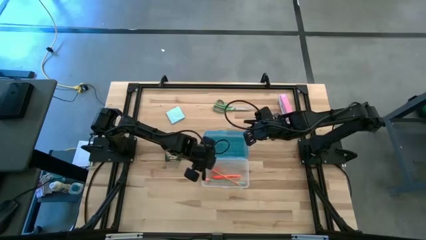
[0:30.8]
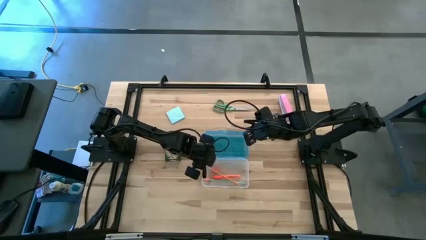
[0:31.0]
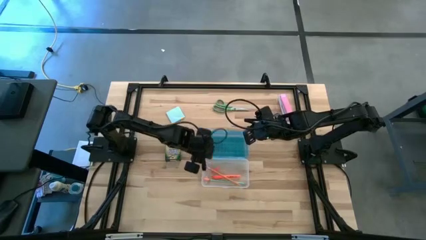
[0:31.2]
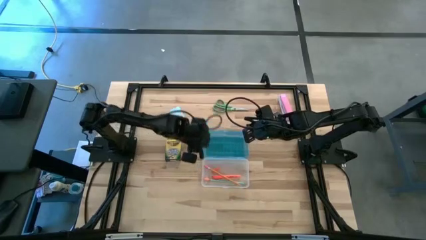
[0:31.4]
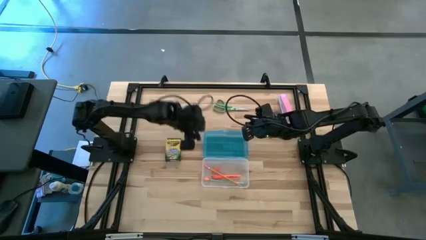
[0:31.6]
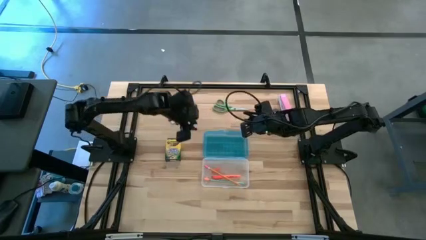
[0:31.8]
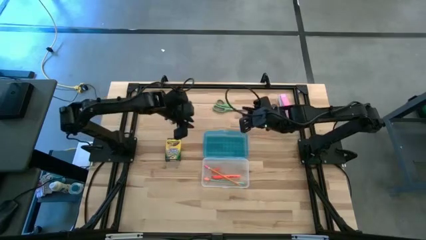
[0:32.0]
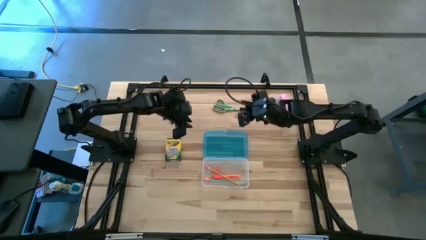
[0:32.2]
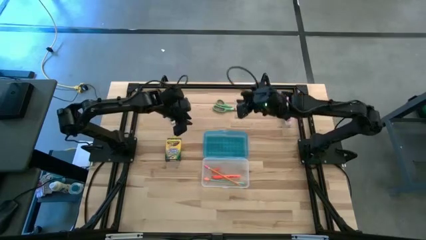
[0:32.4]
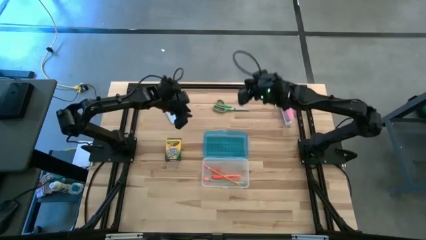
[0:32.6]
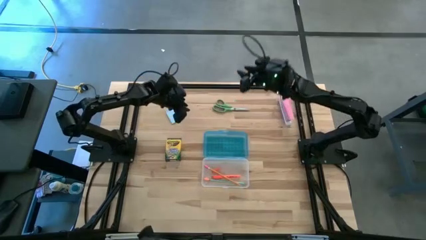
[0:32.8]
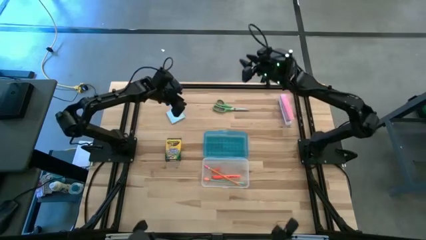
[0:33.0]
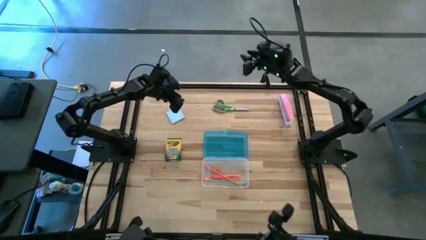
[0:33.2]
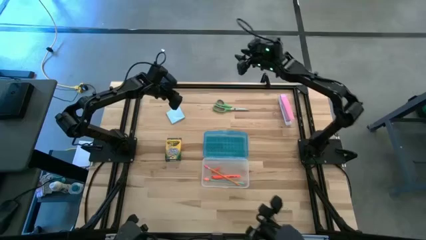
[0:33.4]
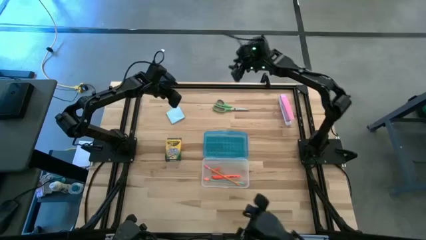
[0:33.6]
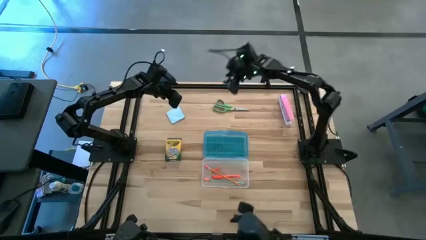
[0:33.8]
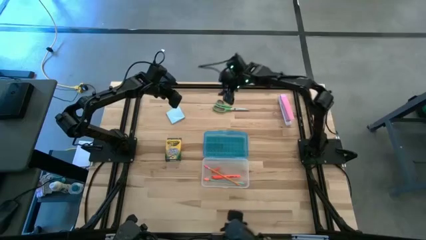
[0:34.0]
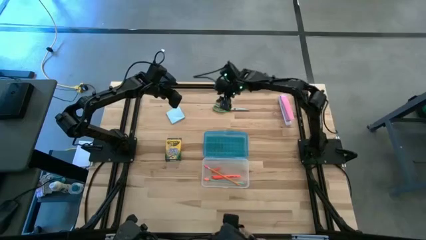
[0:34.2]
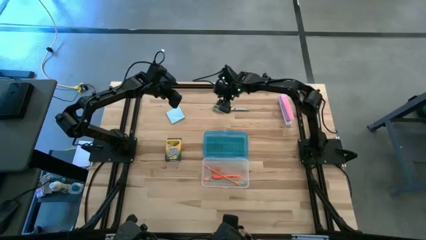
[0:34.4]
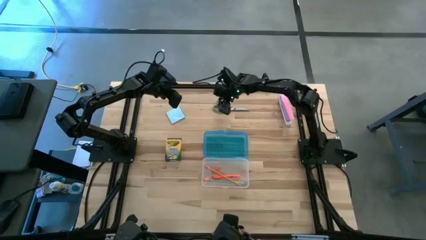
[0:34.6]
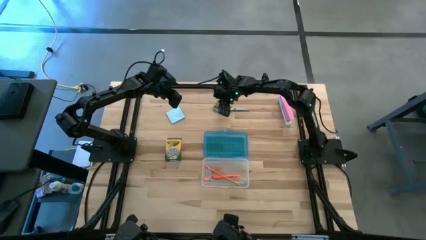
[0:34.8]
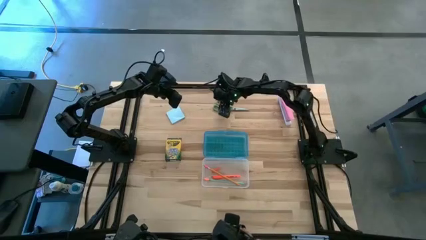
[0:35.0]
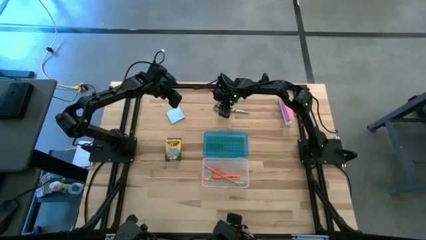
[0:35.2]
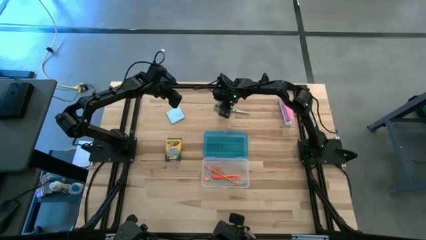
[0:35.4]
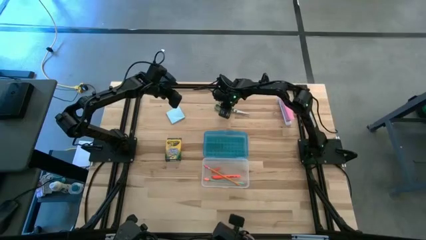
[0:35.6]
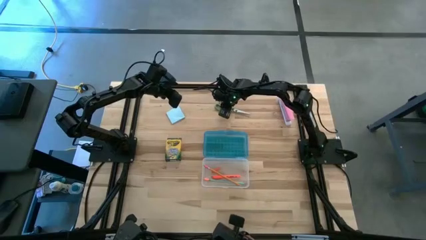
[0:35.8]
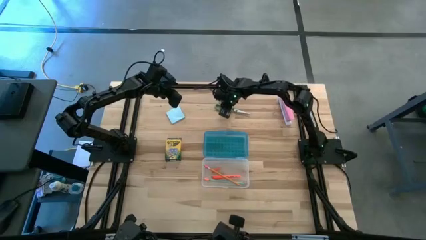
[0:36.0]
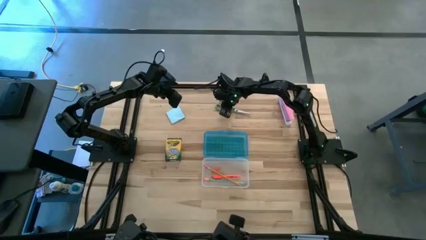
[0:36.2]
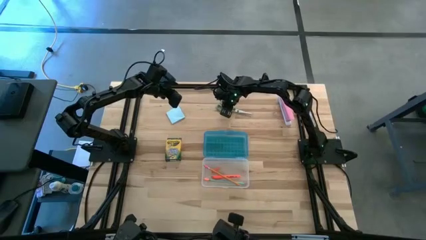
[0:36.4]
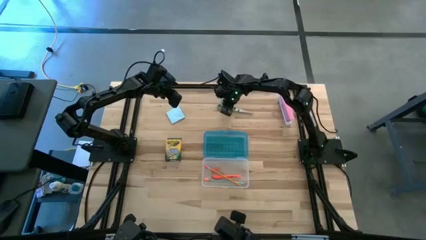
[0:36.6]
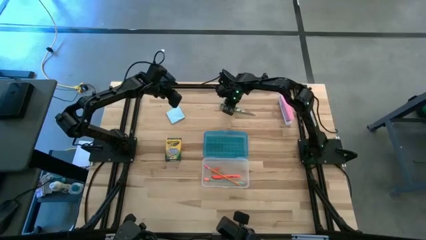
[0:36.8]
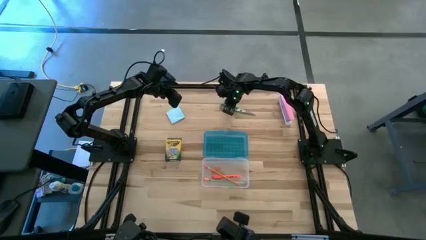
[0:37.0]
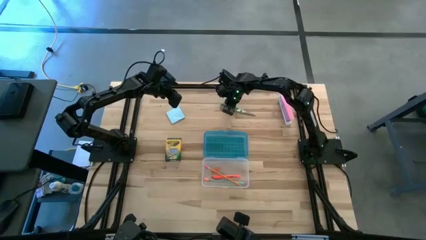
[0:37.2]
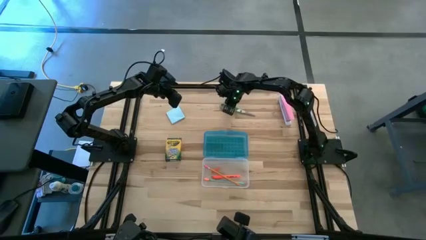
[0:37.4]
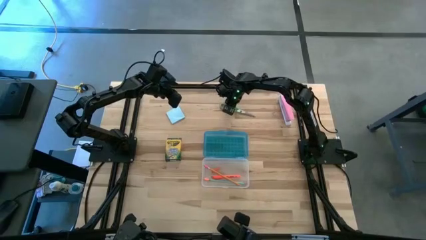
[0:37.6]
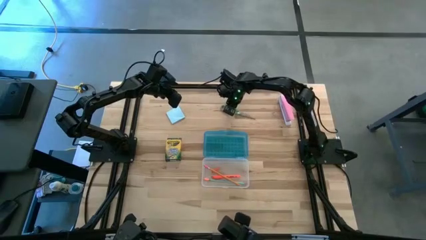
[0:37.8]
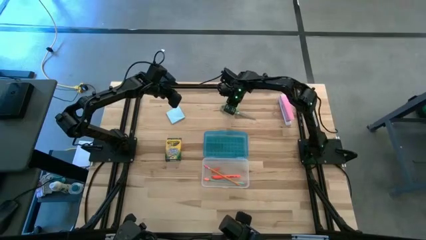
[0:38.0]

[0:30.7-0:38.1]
Task: Pack school essentials
Put the green scissors into the blue supply box

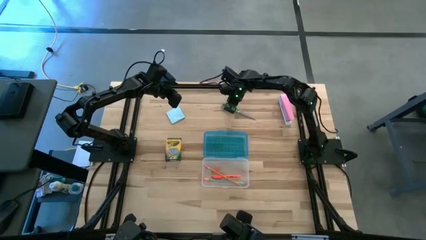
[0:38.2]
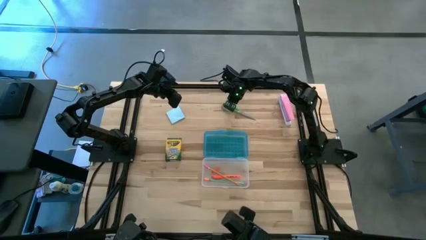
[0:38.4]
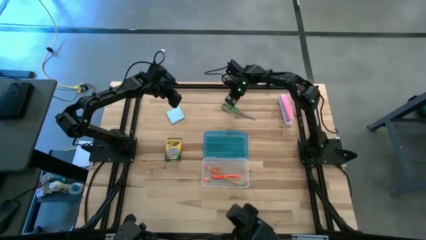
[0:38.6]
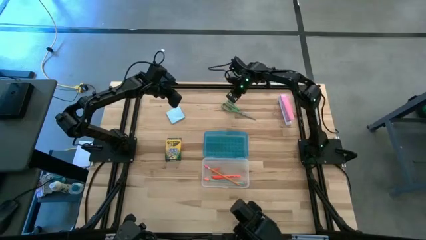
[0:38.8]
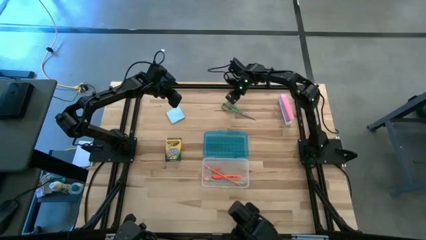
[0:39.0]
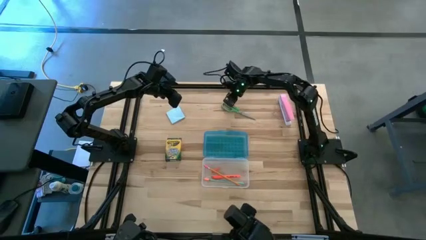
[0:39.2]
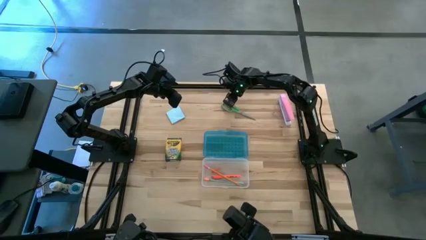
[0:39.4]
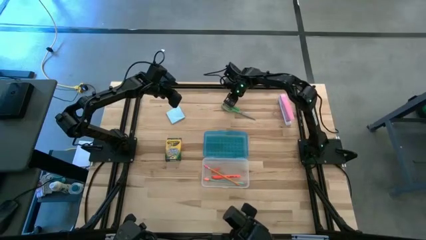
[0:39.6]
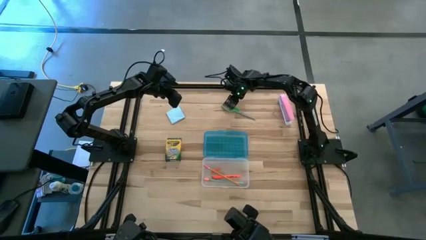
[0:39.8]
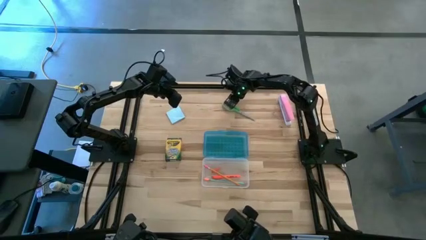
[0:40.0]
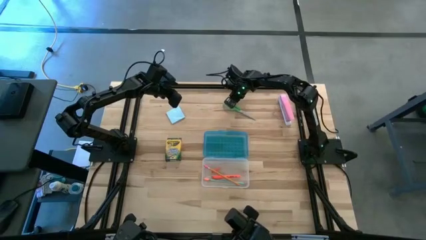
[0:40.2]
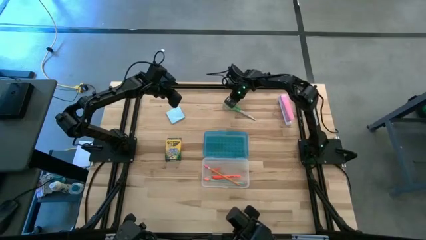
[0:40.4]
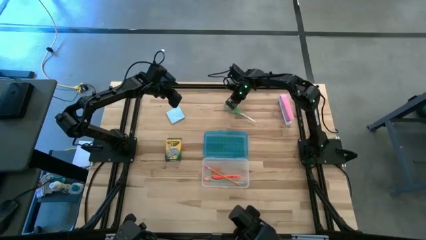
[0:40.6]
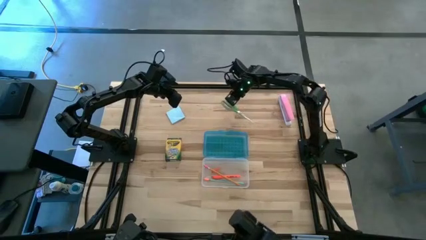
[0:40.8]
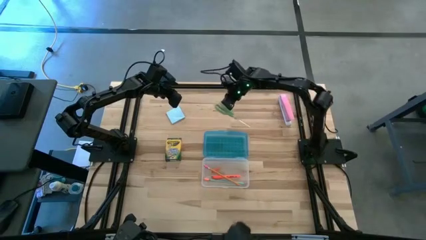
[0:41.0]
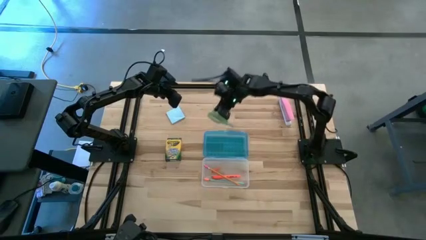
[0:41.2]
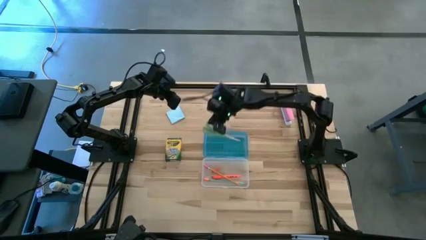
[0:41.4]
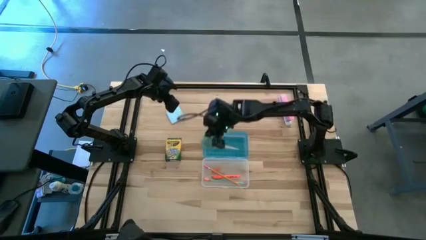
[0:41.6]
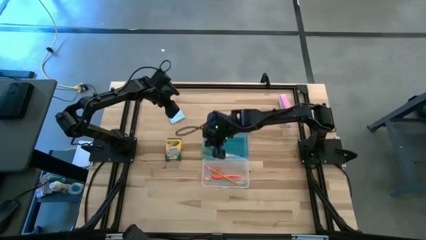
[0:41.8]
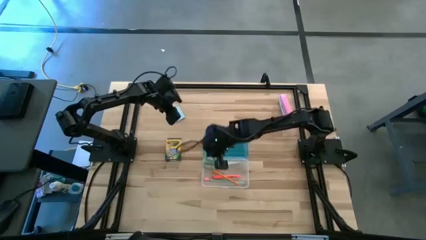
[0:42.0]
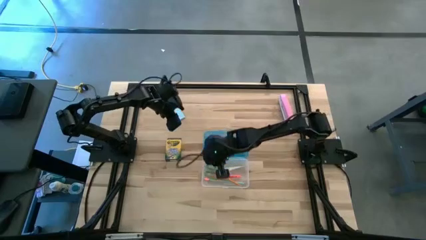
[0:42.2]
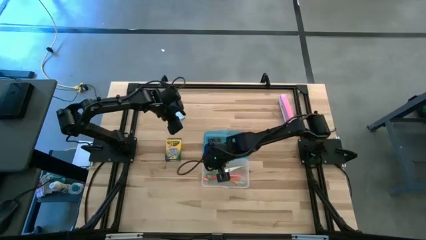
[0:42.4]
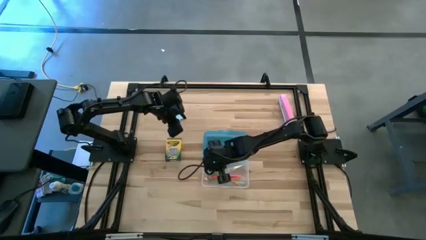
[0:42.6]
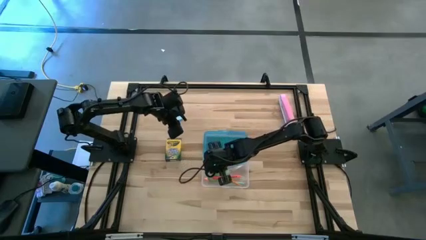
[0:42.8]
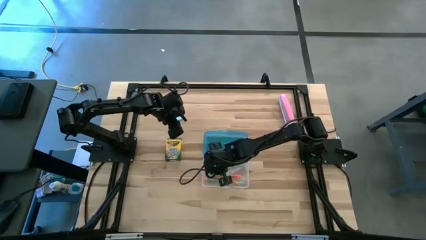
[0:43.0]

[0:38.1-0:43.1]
Put the green scissors into the blue supply box

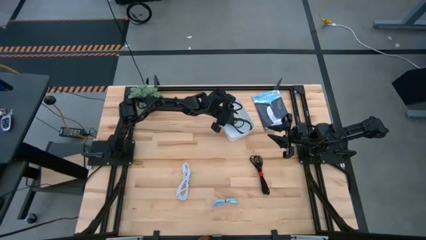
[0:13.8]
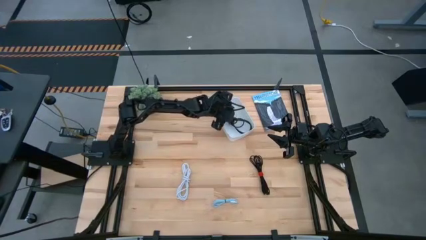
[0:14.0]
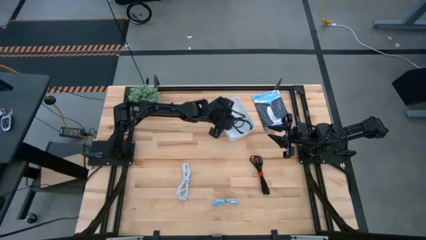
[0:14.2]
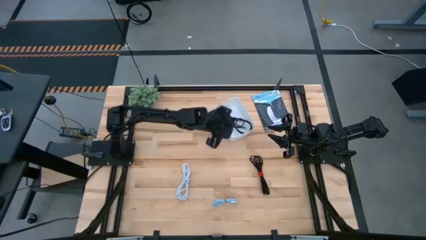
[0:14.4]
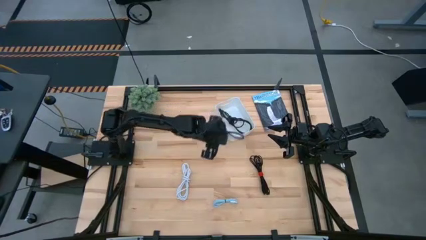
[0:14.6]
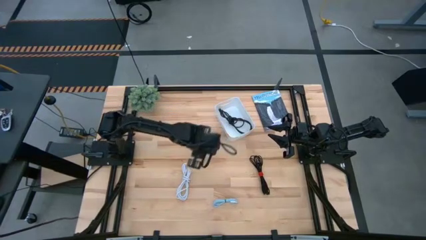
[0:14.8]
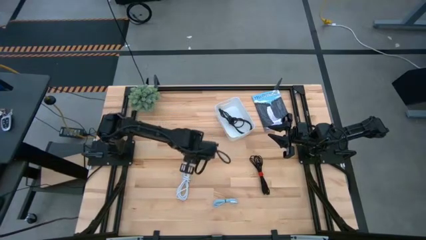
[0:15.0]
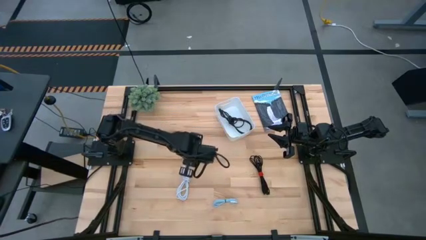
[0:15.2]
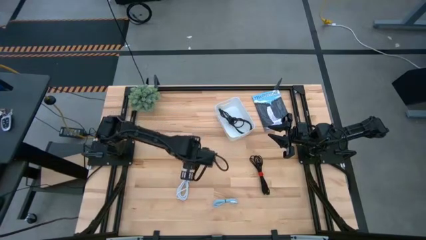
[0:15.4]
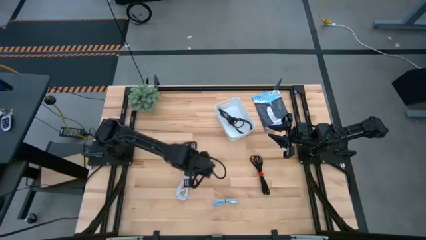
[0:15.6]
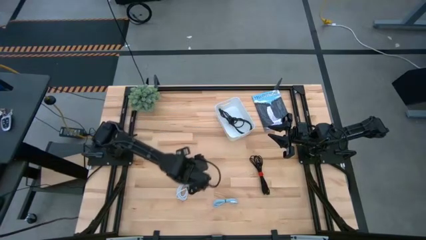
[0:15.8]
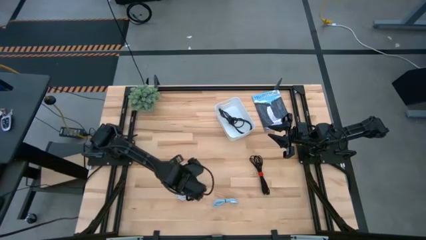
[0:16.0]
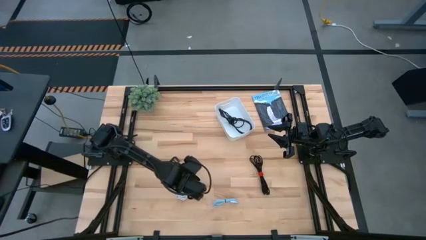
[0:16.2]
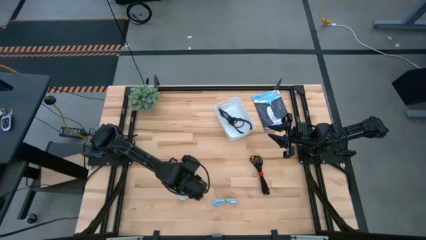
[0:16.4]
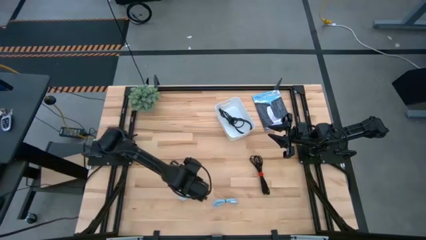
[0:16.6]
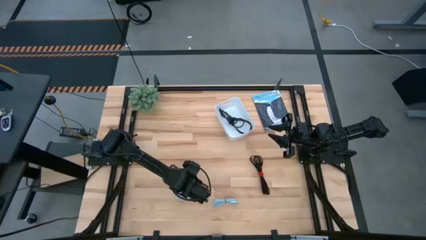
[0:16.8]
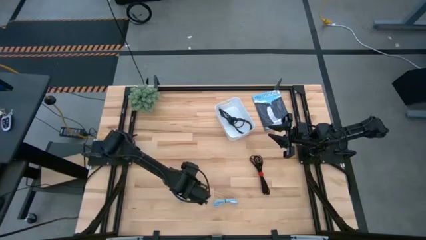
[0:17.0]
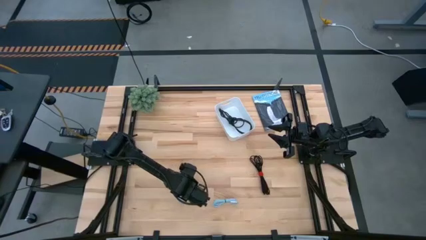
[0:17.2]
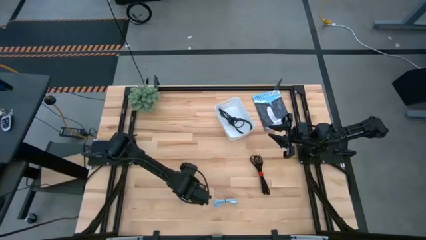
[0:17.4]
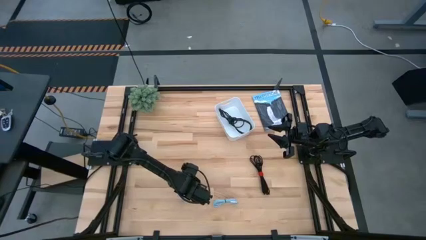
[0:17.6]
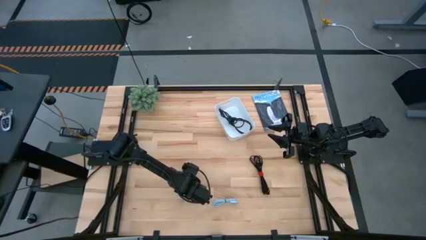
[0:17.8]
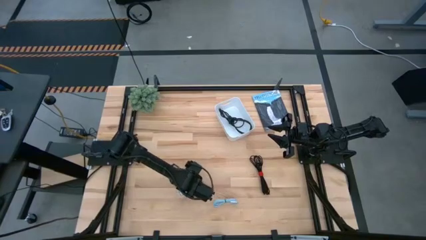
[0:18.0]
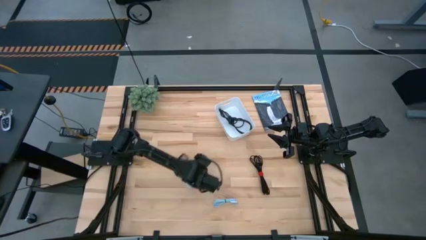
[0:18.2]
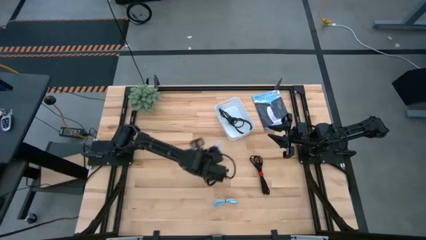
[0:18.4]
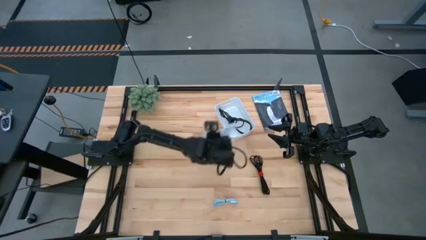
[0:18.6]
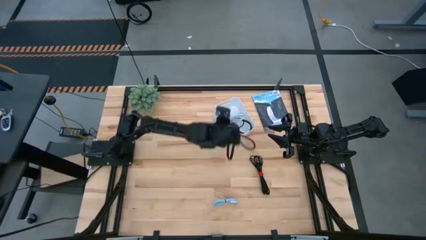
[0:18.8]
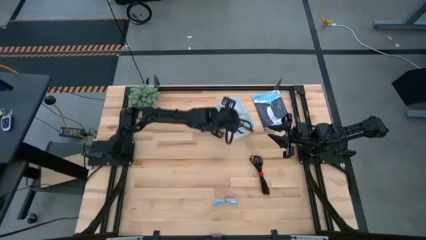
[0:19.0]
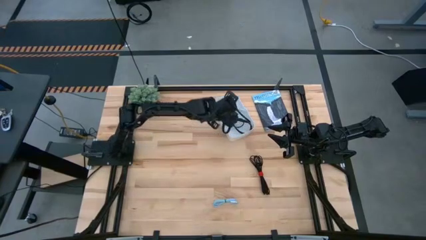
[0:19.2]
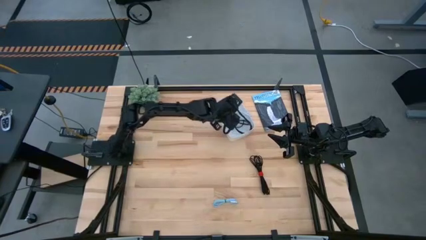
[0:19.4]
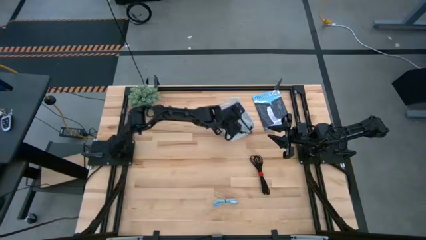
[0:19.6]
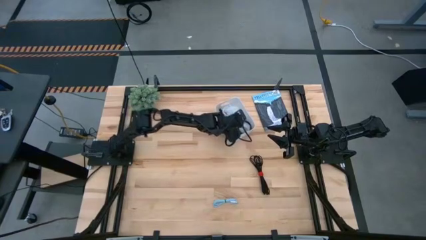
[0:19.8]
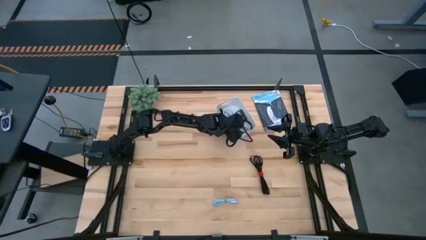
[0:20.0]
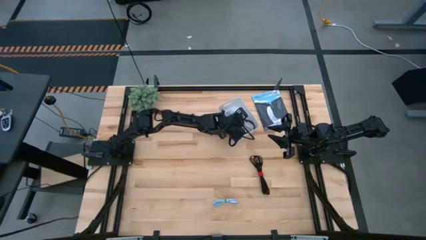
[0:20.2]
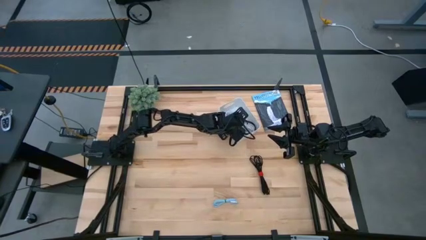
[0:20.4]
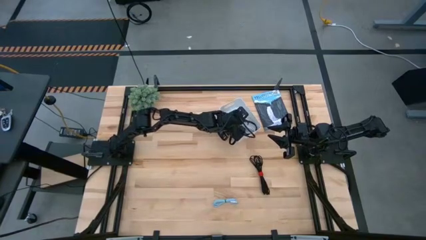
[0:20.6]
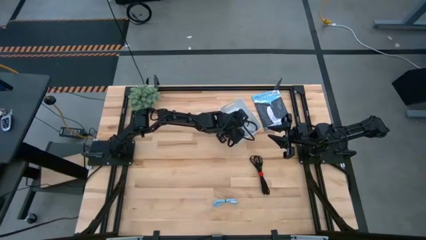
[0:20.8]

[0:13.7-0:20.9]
Task: Pick and place USB-C Cables
Put the white charger cable into the white bin
